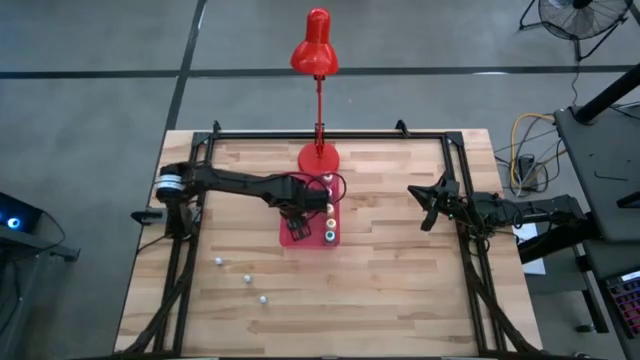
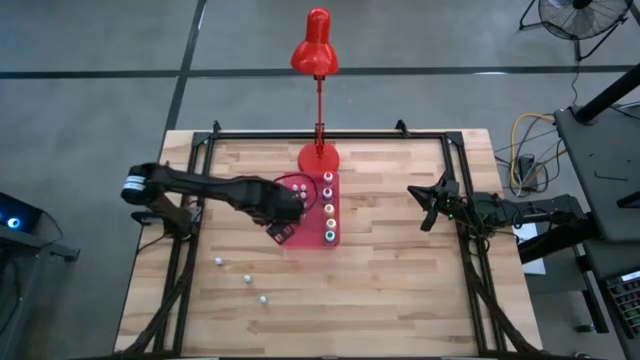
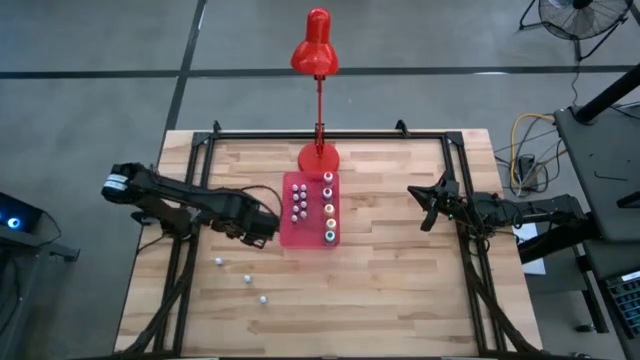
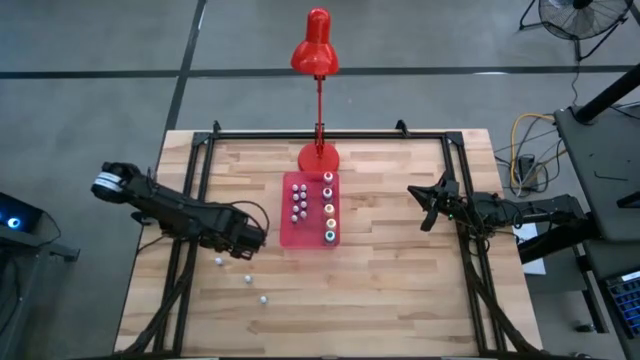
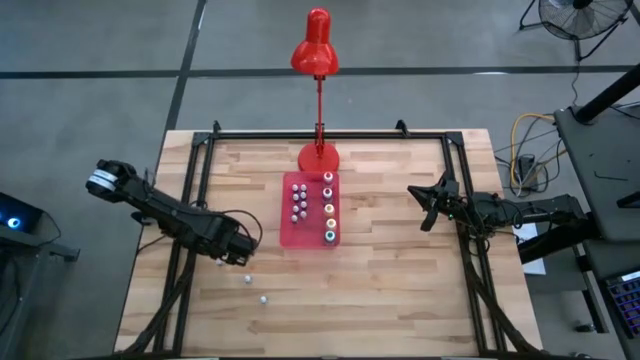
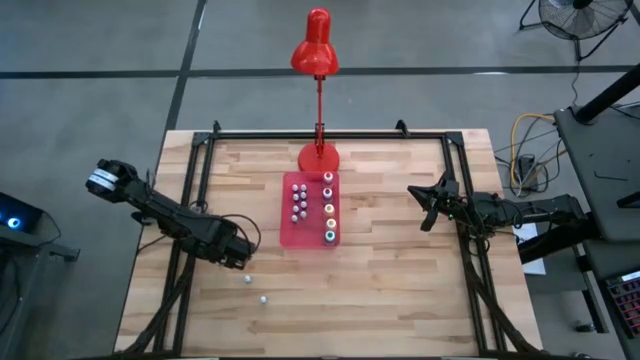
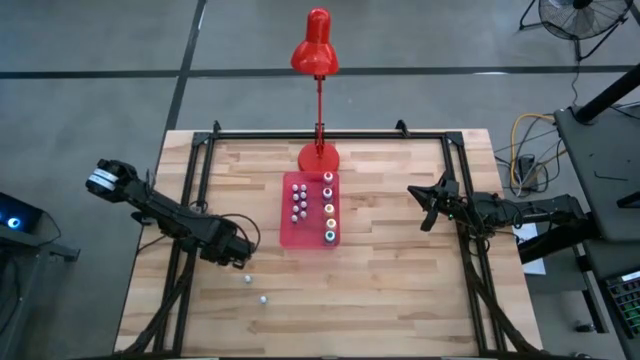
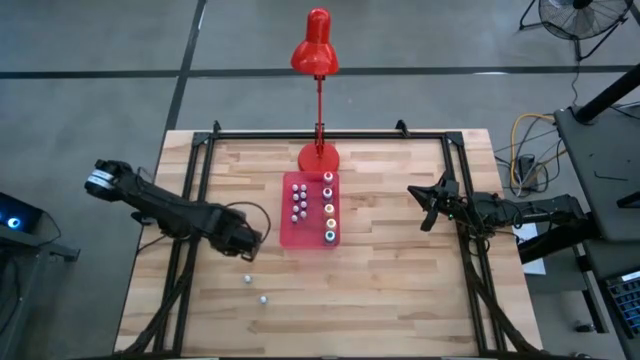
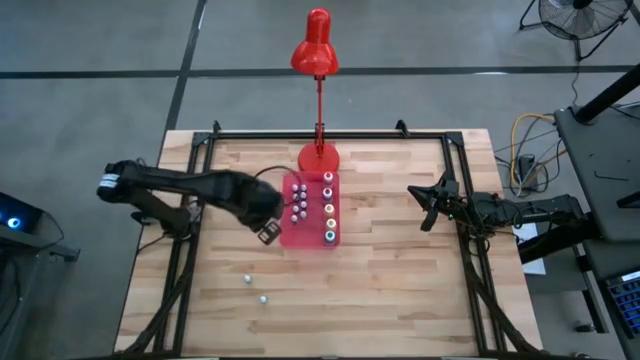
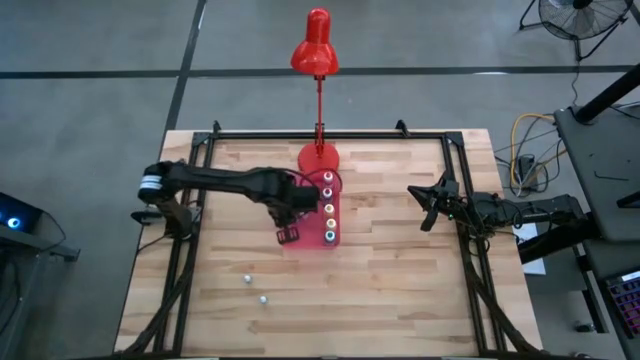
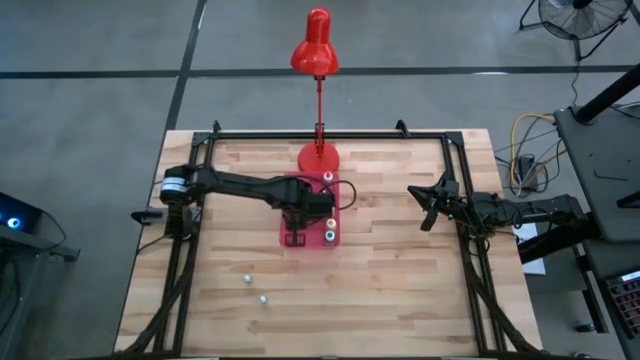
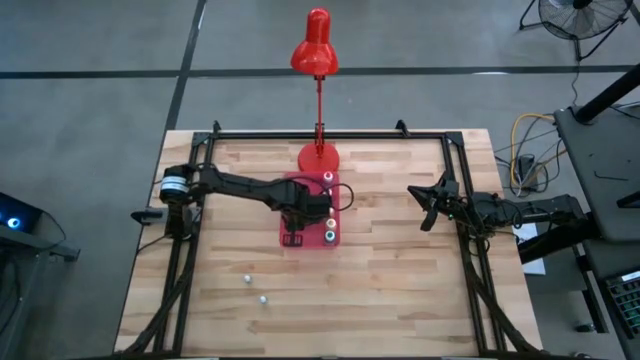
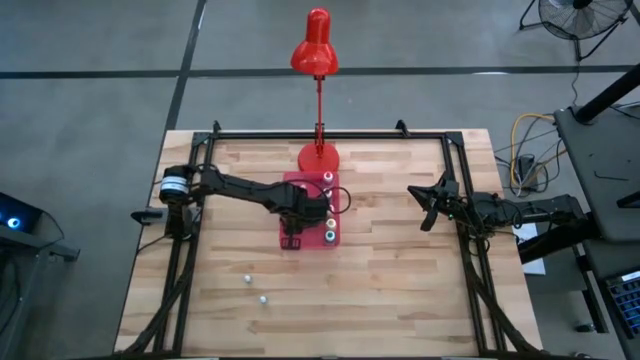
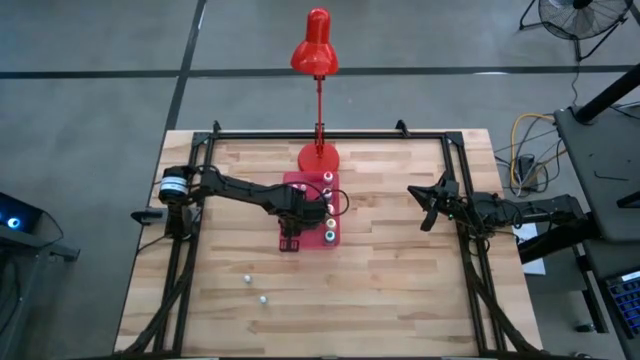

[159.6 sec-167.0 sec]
Task: Pick & Place food coloring
Put the small black food coloring bottle into the pink bin

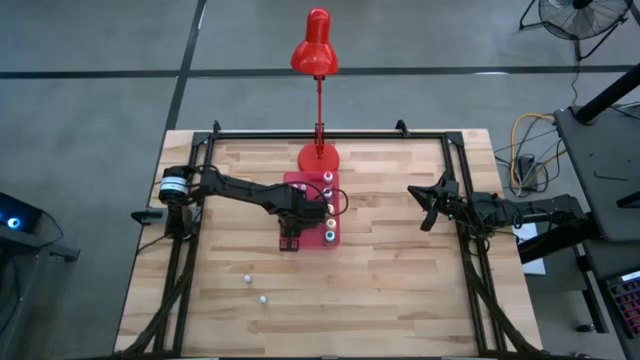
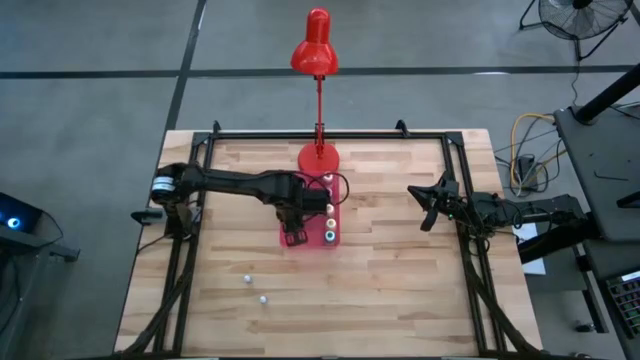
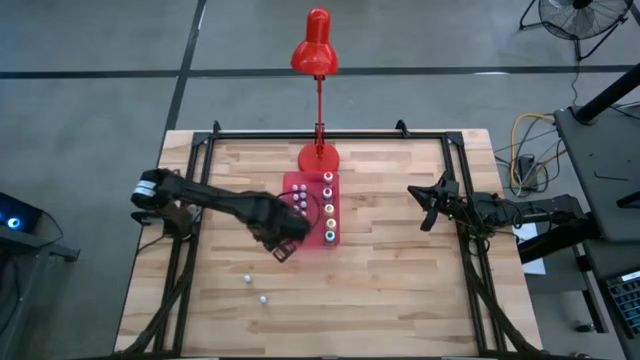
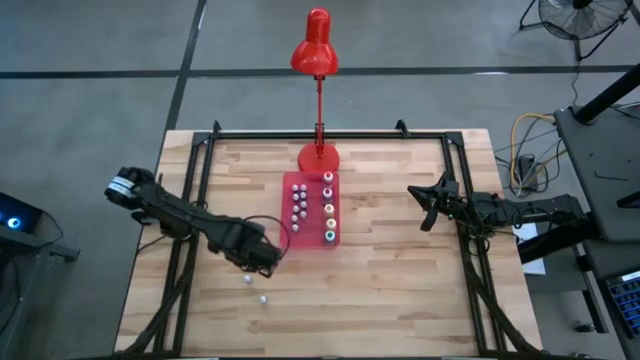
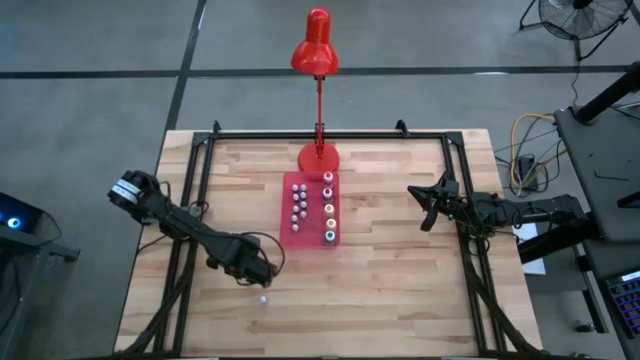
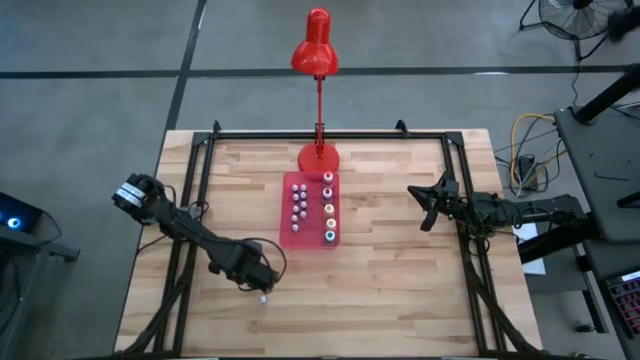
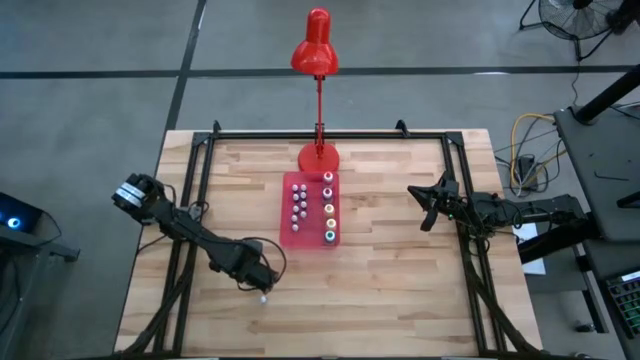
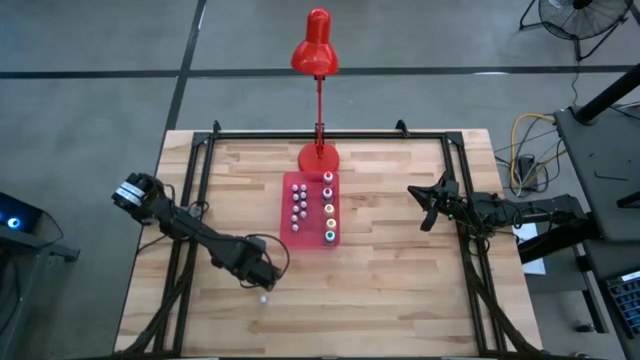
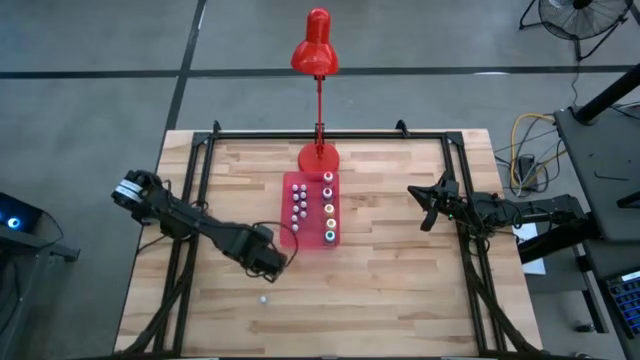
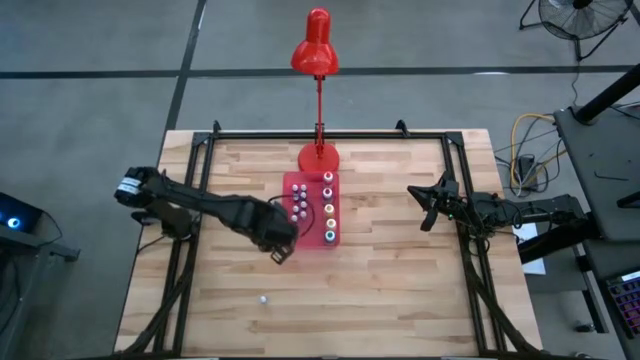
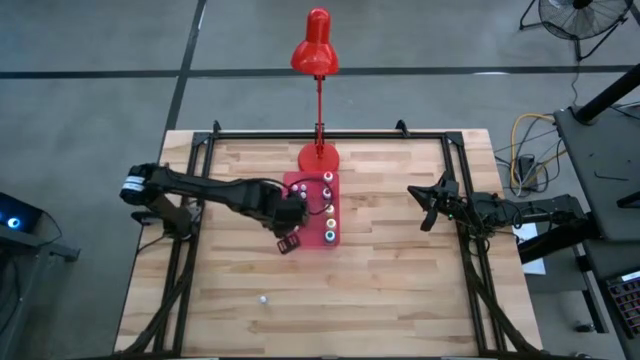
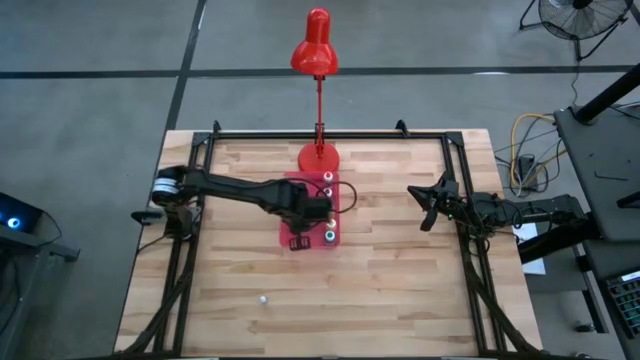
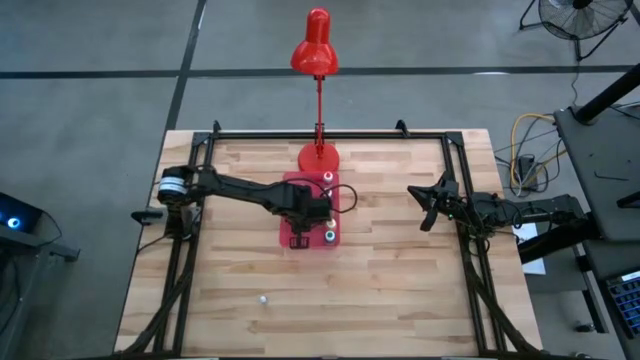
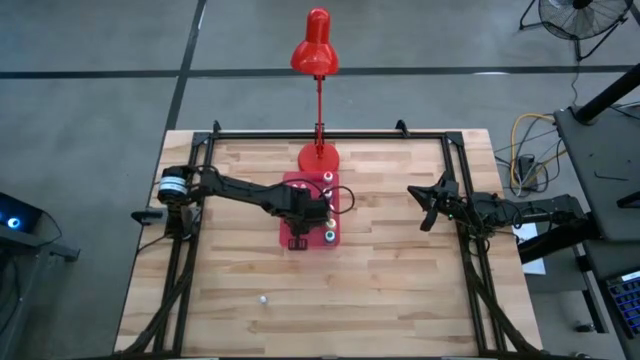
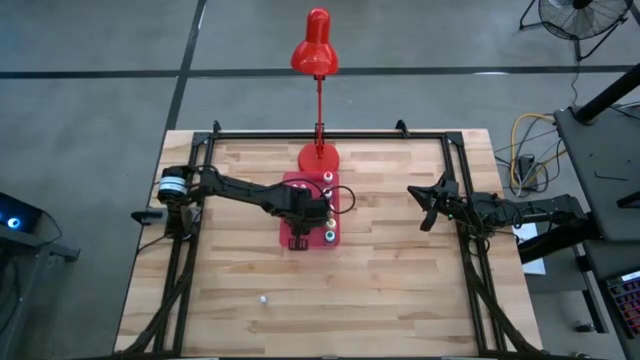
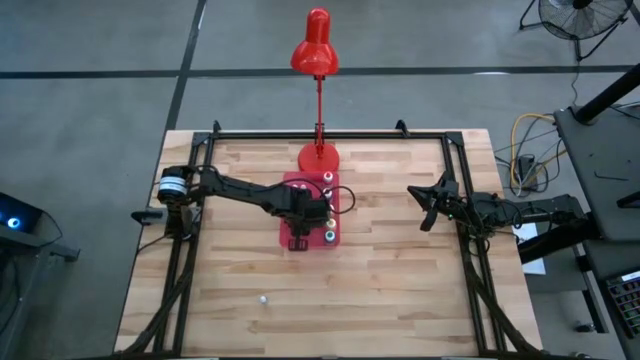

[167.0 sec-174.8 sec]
Put the small black food coloring bottle into the pink bin

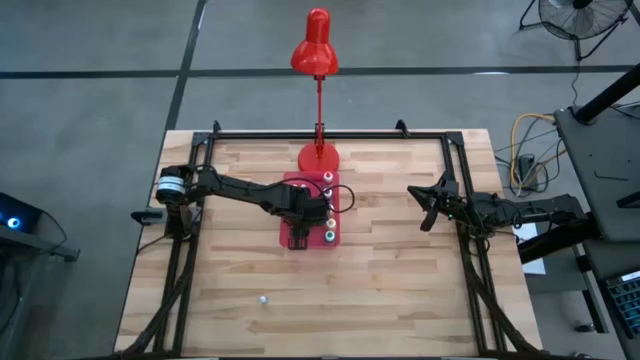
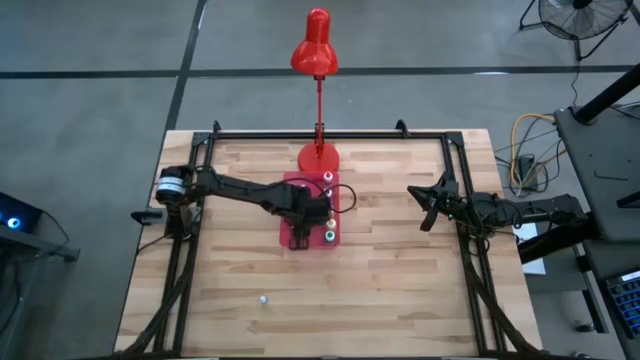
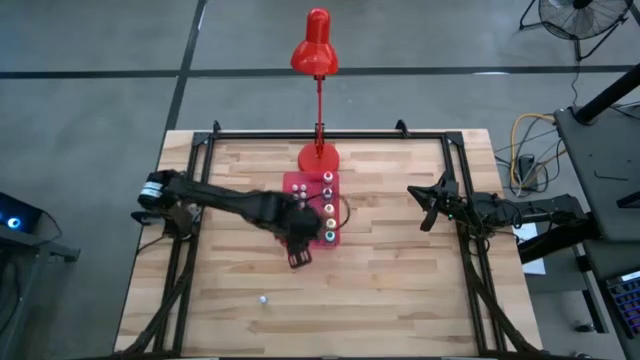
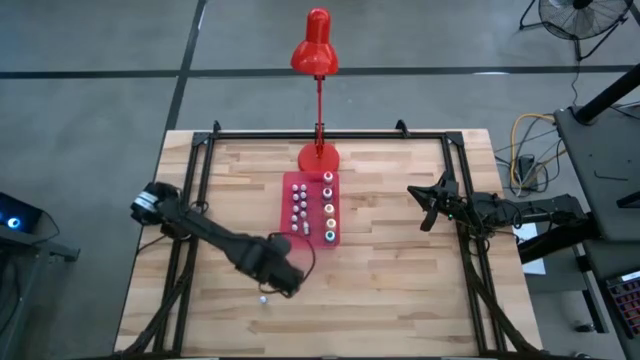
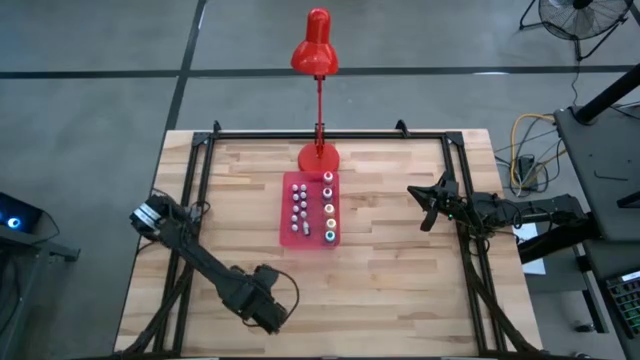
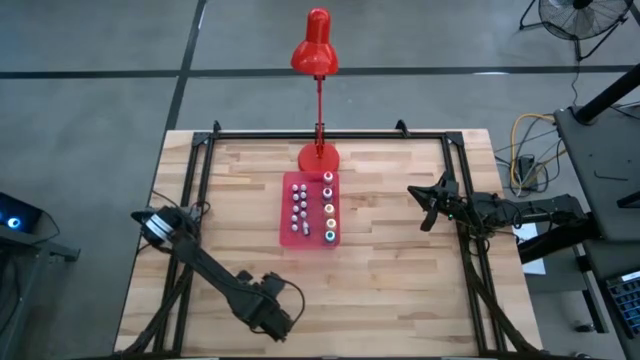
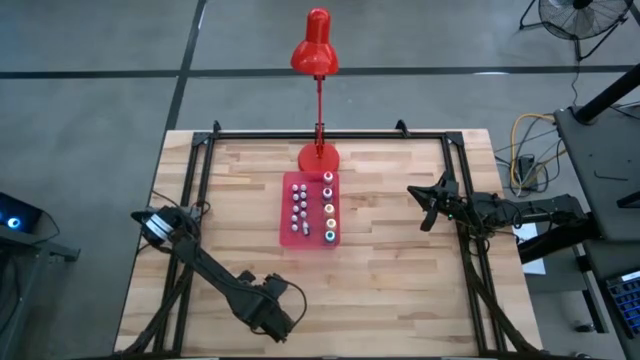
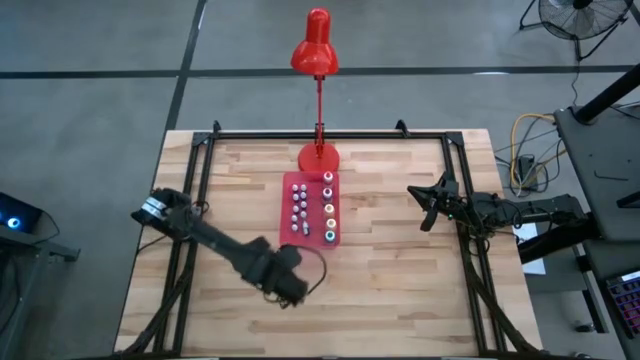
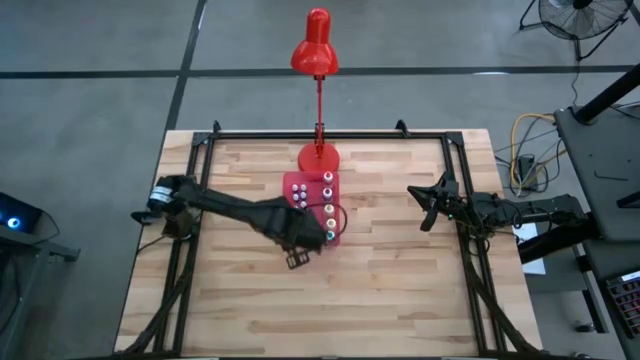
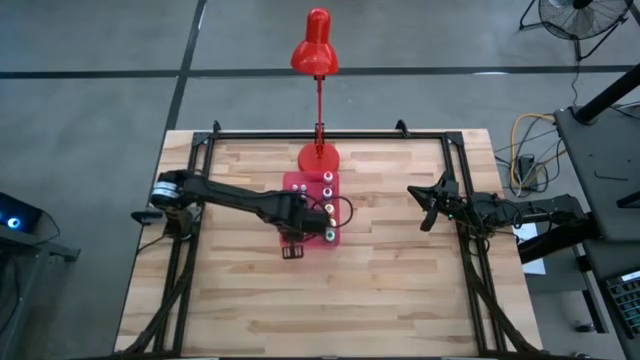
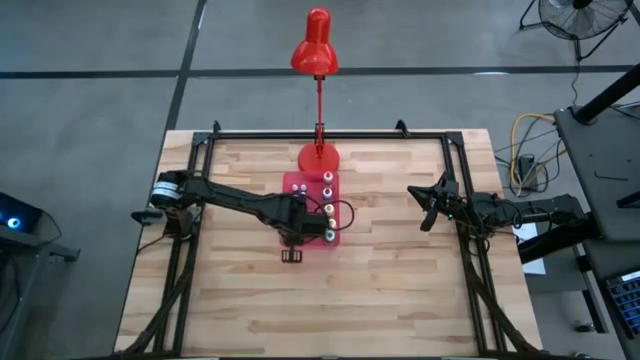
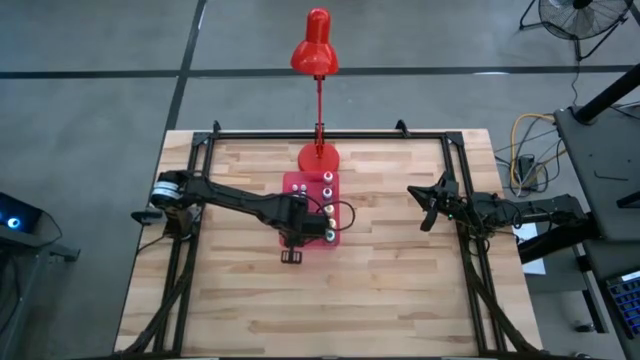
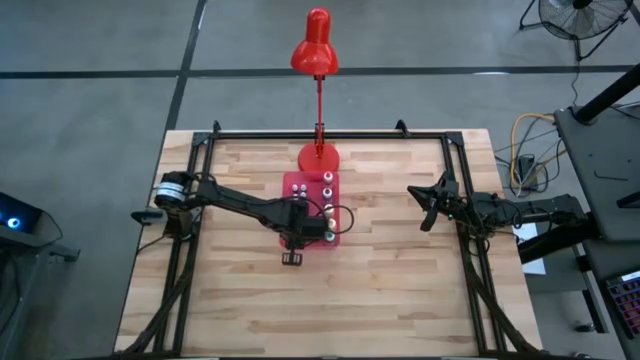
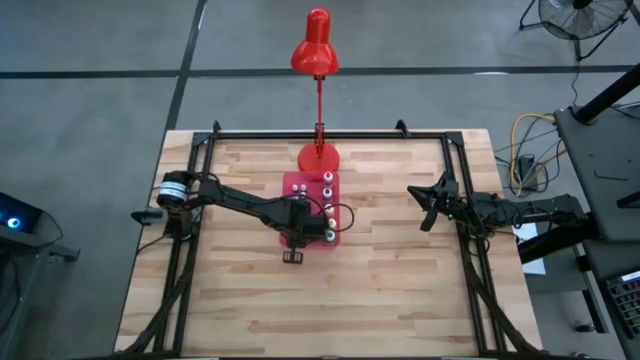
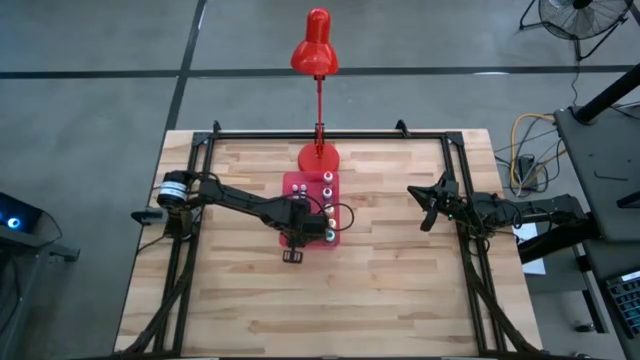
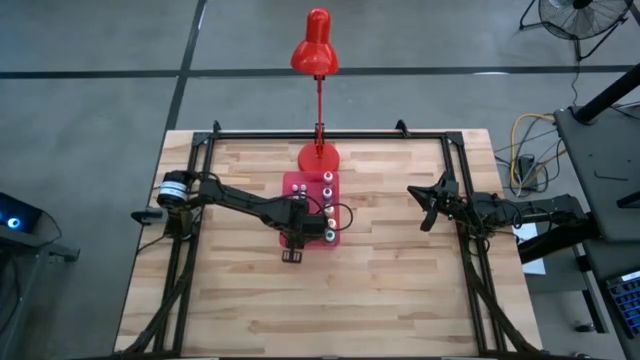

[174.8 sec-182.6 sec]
Put the small black food coloring bottle into the pink bin
